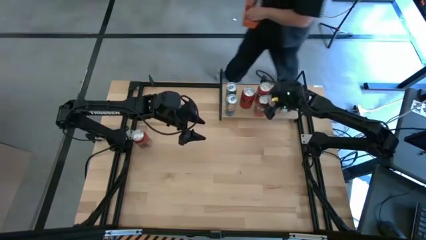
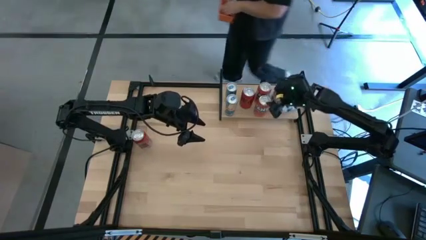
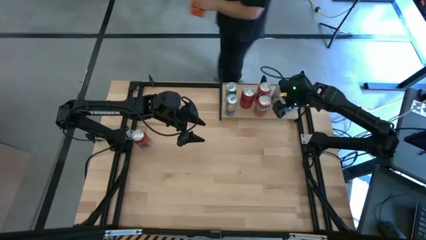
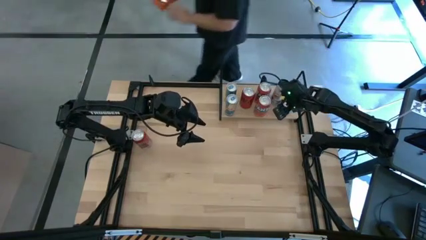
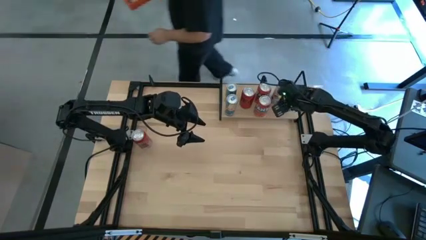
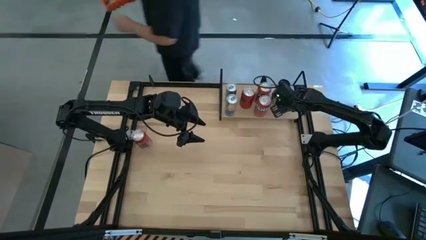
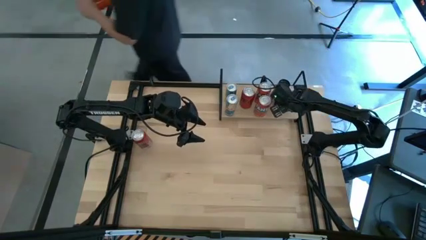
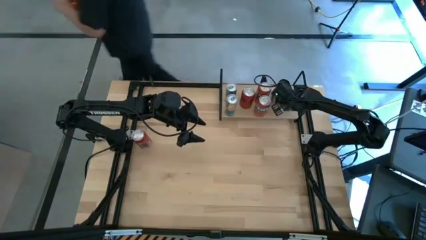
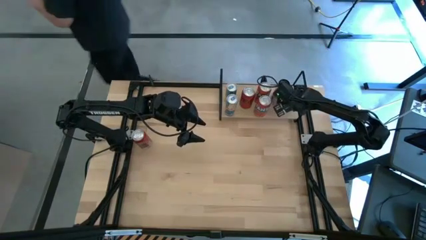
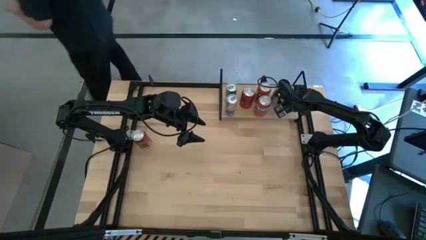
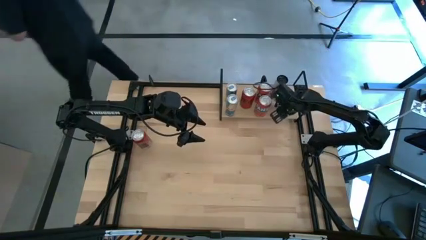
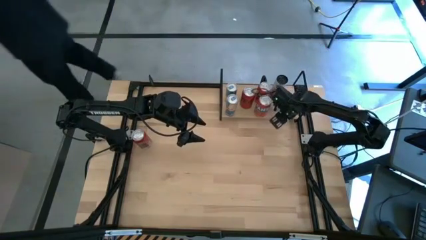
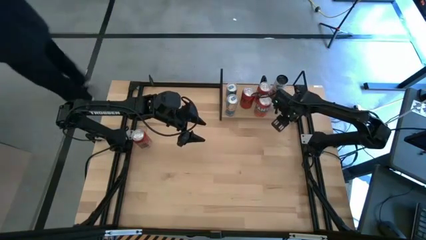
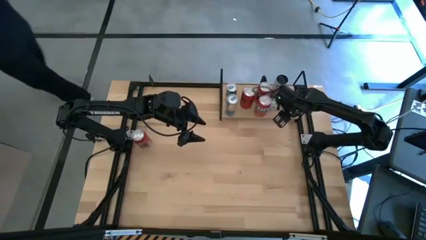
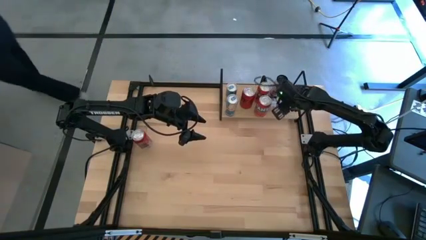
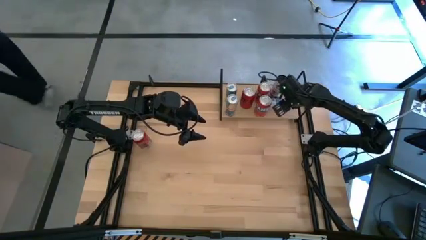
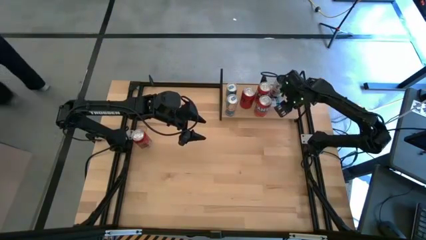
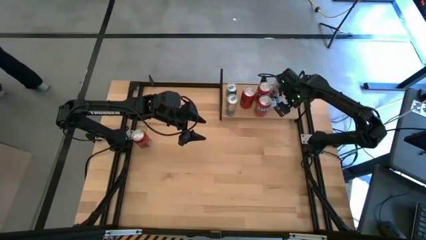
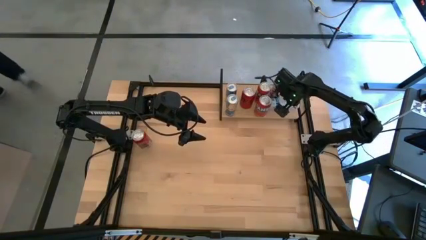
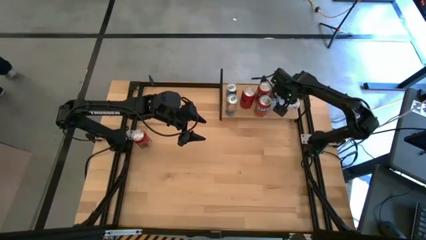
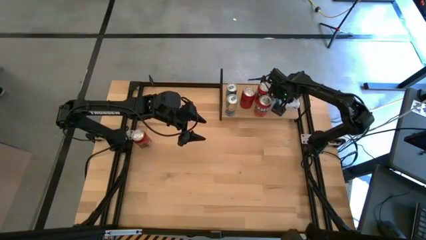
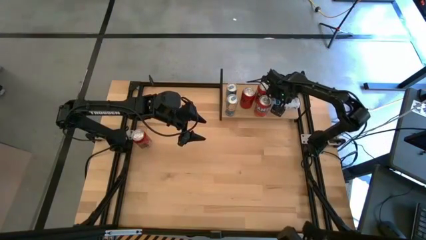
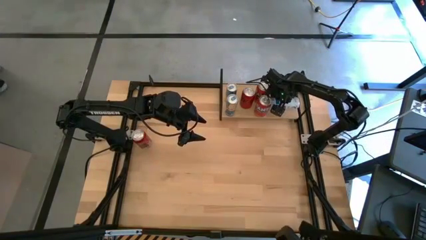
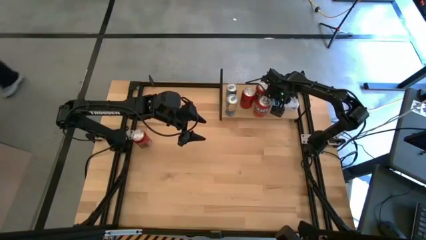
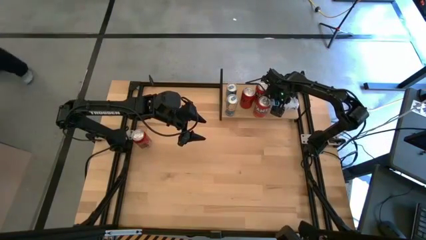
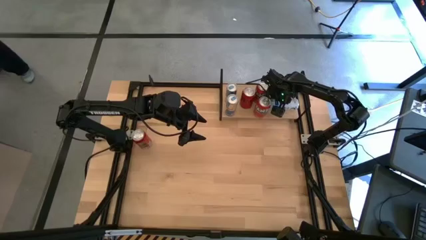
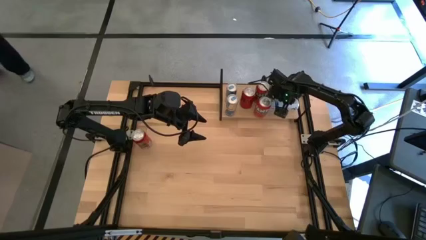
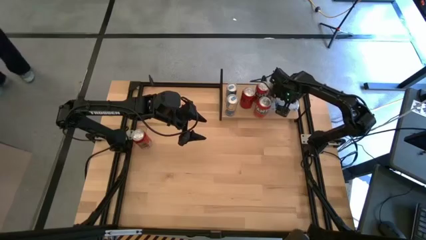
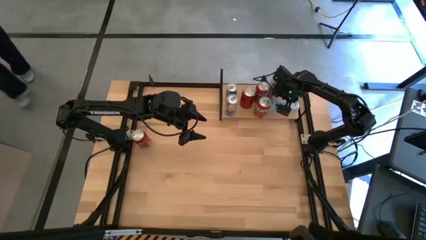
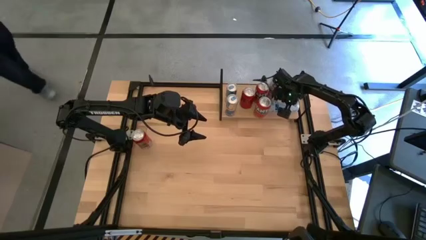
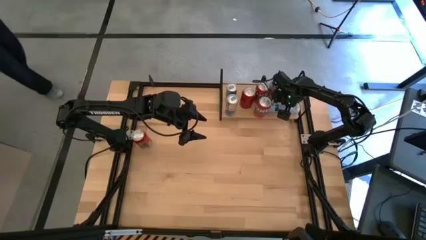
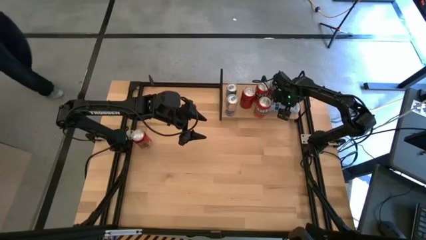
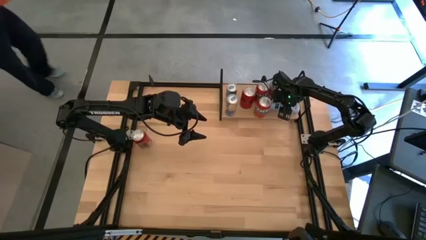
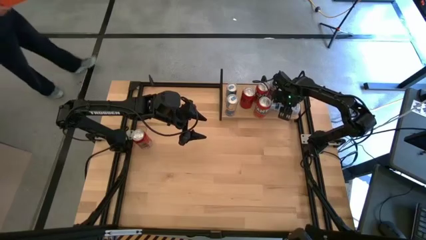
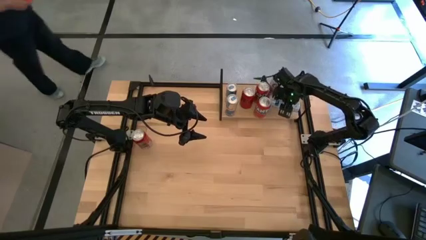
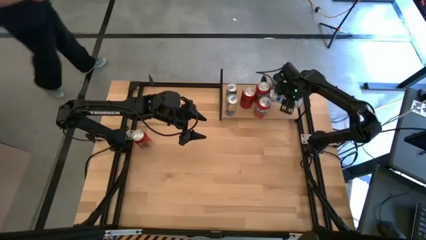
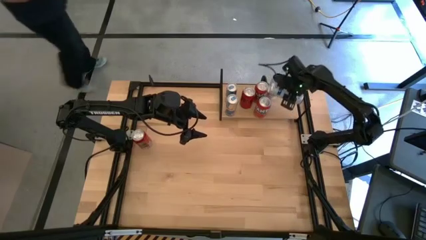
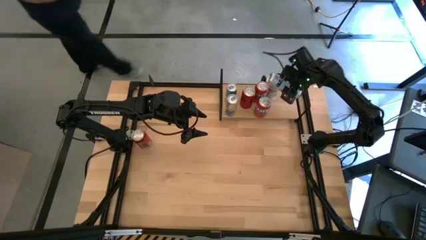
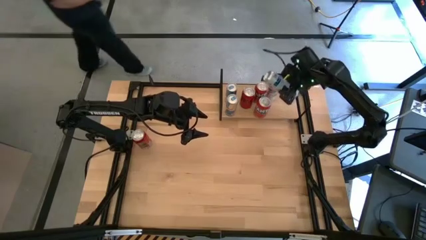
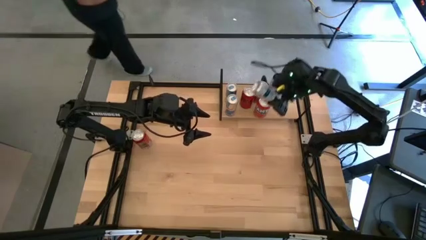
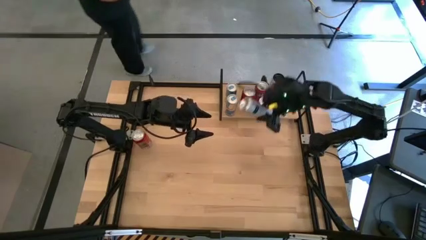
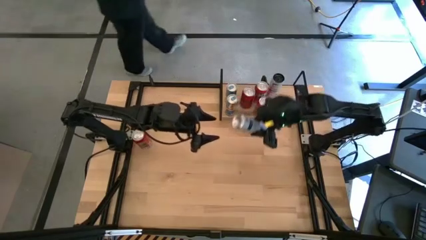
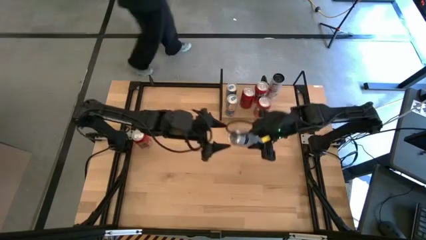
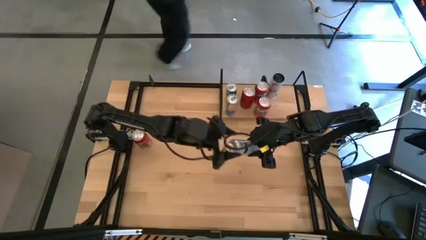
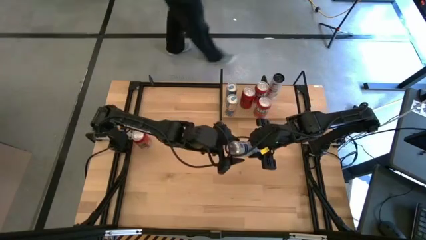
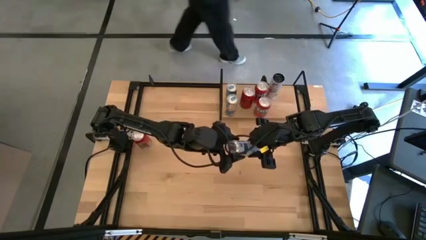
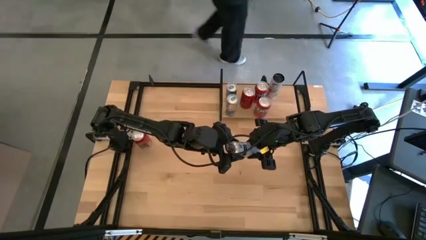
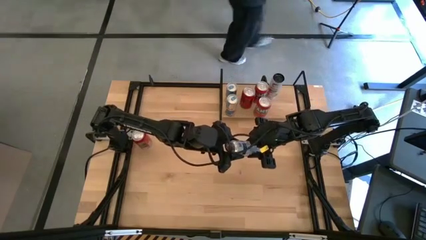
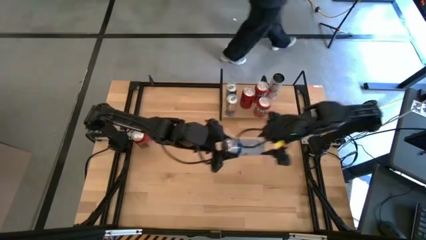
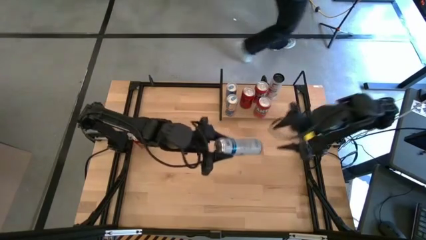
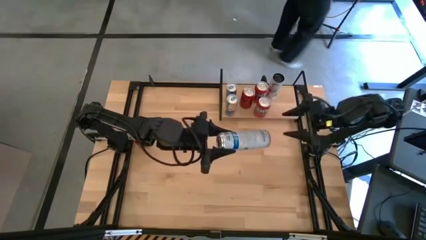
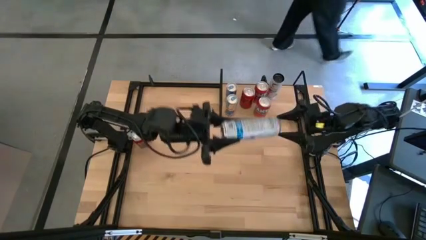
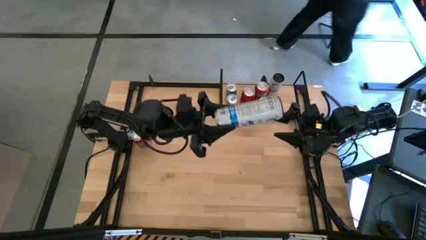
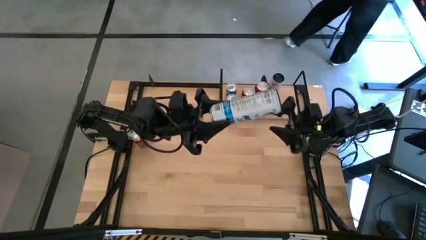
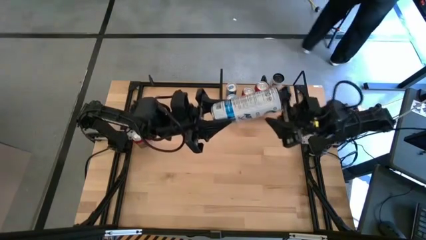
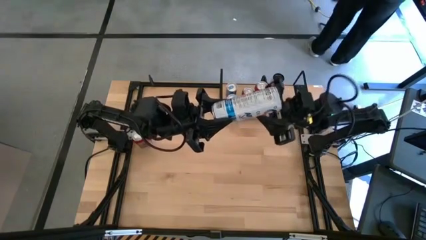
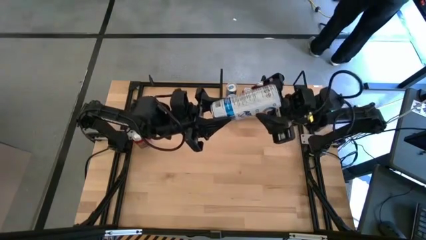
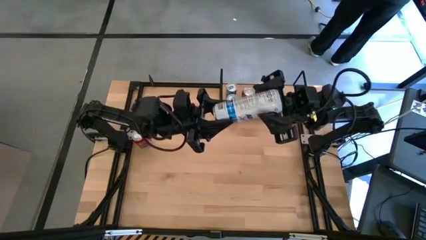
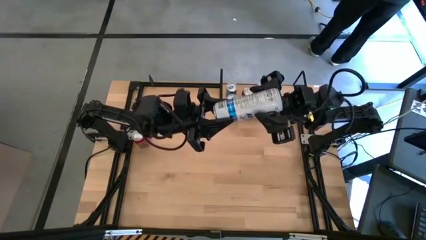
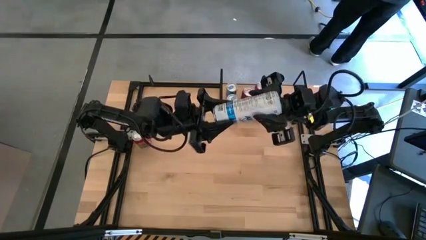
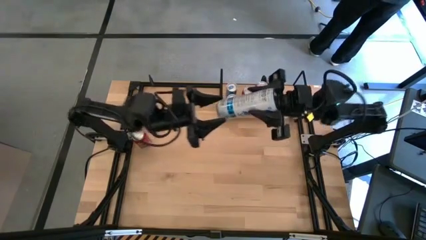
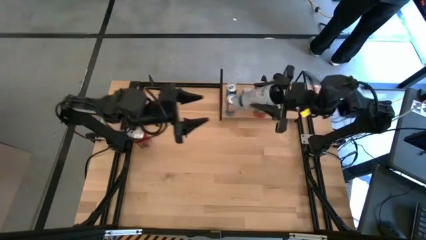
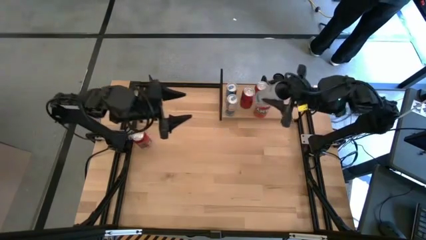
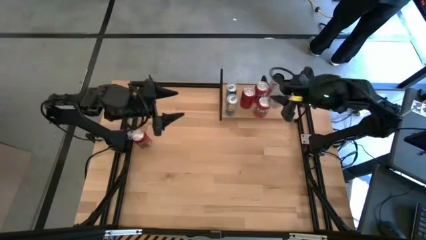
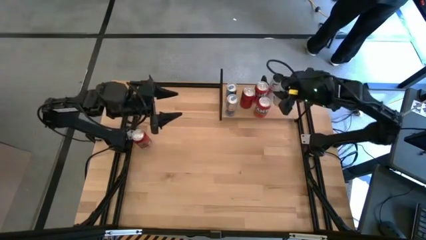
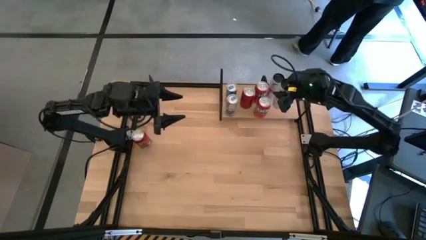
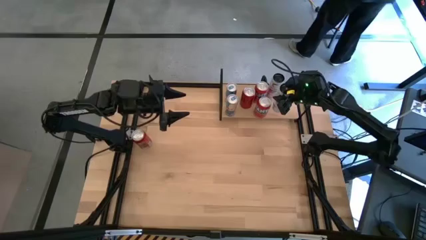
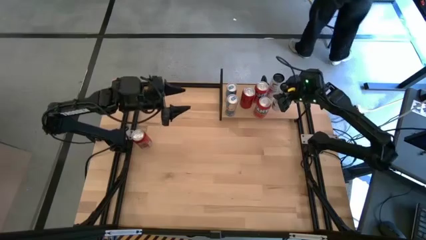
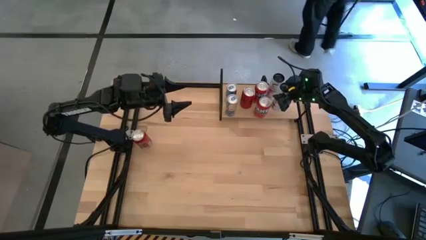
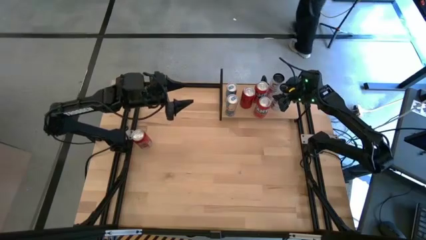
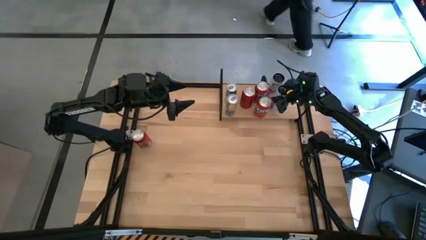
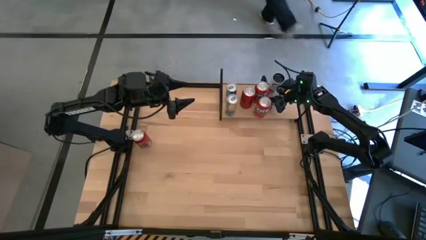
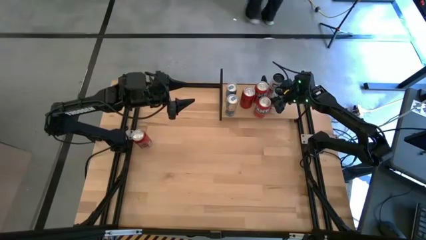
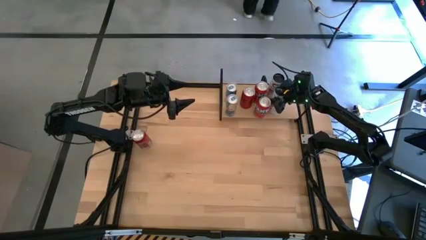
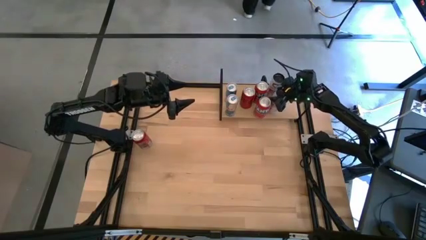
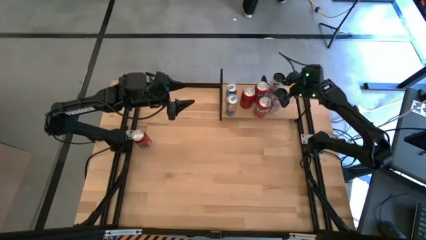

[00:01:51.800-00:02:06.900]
Task: Place canned beverage on shelf
Adjust the bottom white-blue soda can on the shelf
